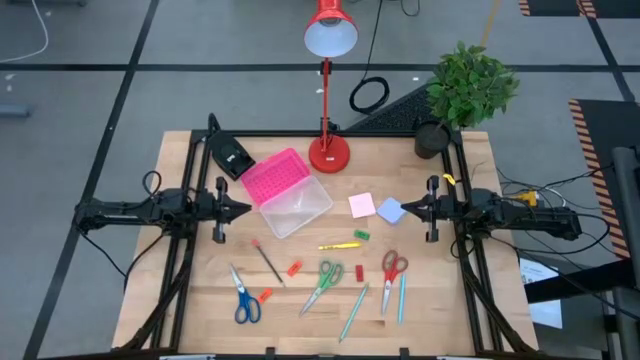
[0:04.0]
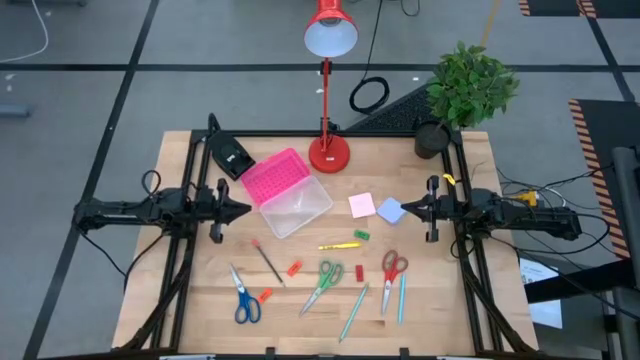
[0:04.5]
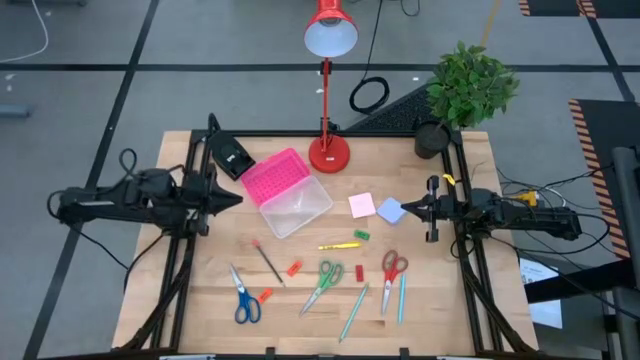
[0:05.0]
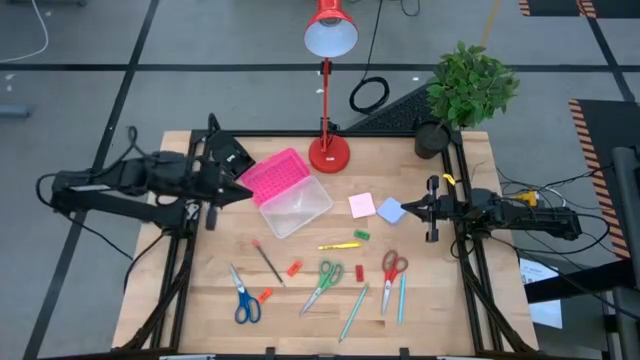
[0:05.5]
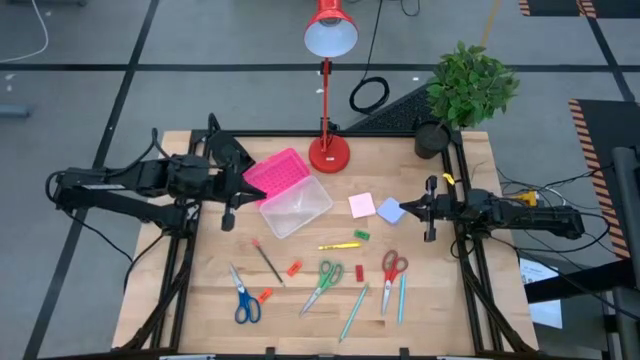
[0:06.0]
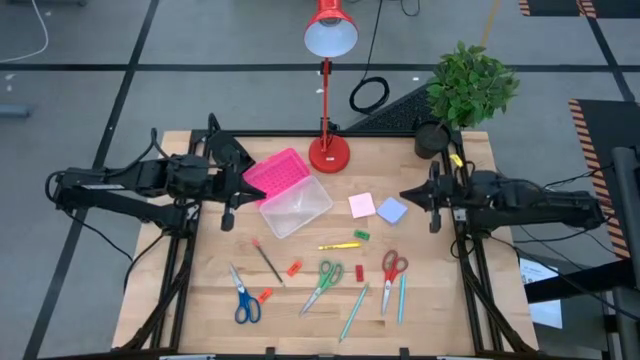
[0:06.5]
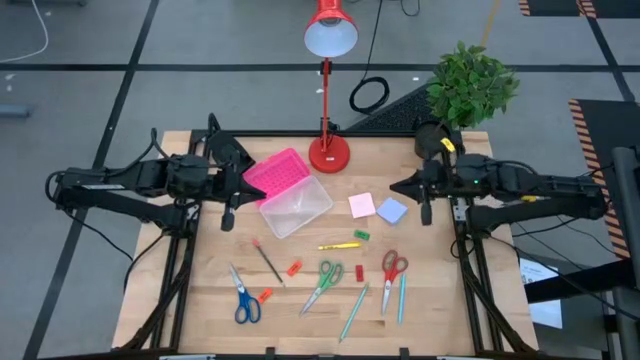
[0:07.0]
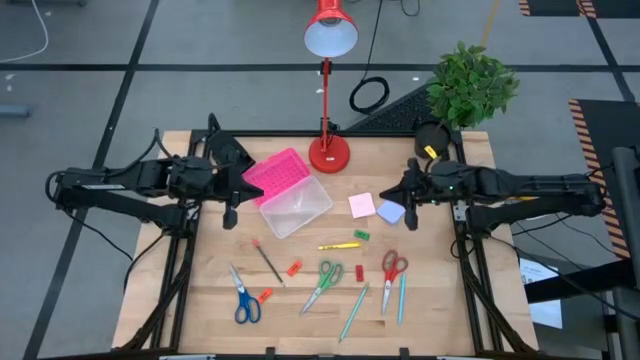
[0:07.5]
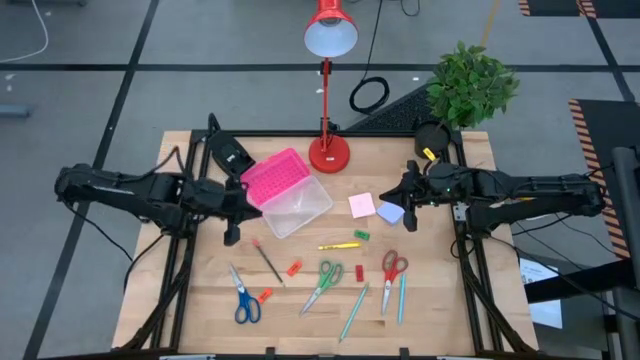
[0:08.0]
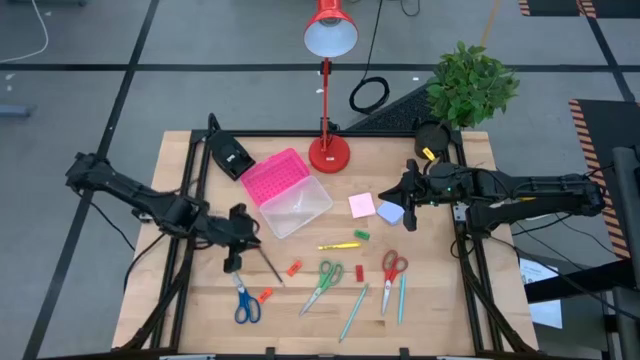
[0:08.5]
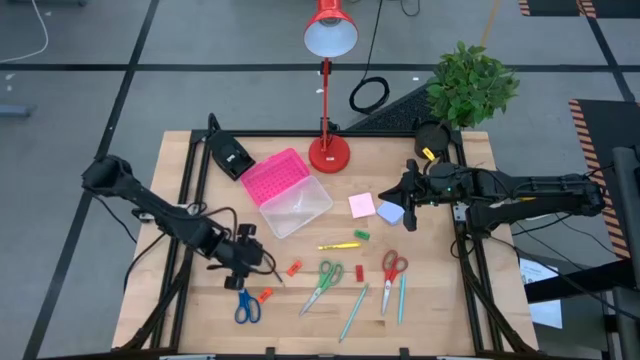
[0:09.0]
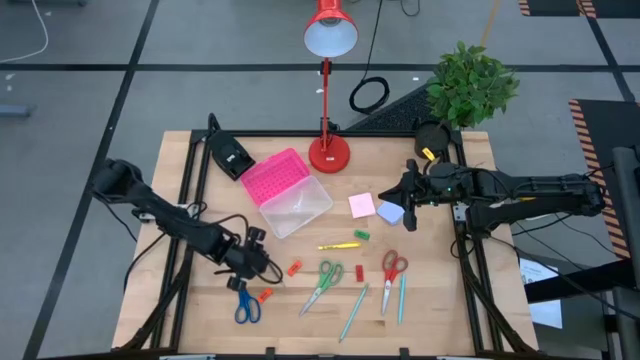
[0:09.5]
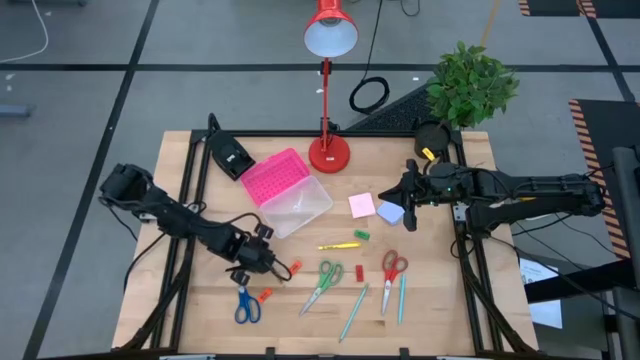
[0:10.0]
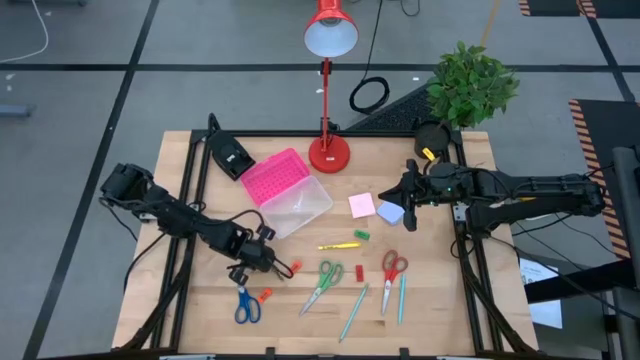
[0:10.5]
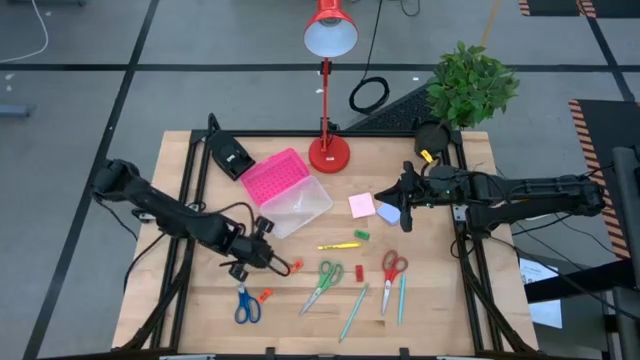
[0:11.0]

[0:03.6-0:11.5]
Task: Pack school essentials
Put the dark blue pencil into the pink supply box

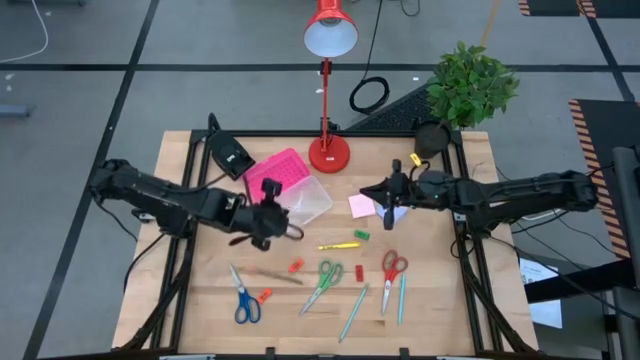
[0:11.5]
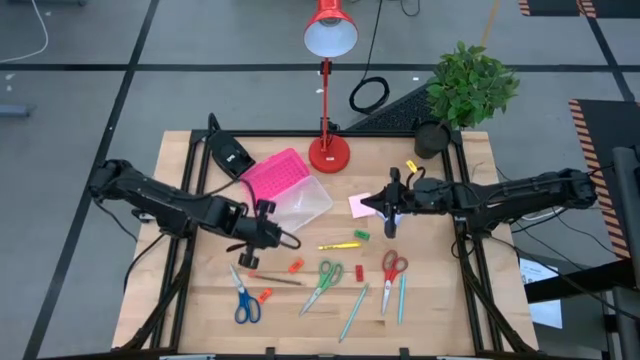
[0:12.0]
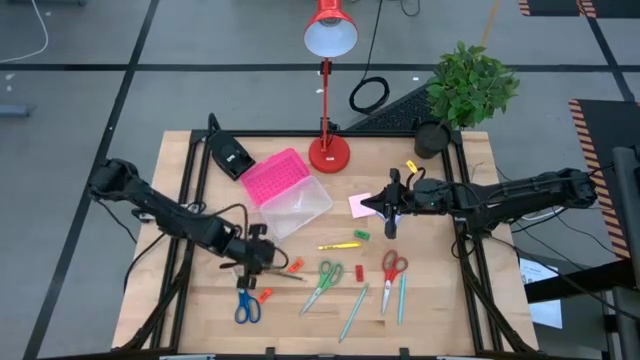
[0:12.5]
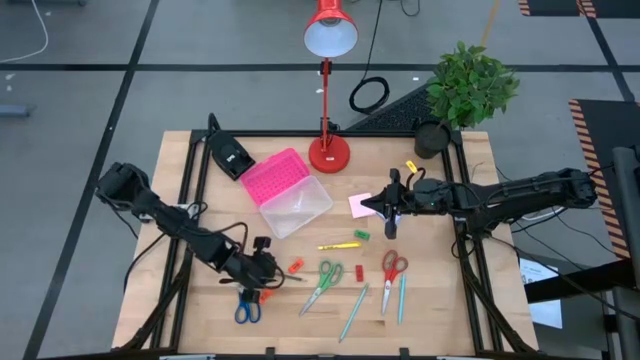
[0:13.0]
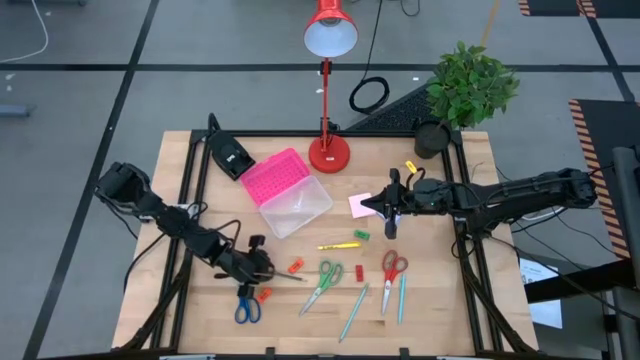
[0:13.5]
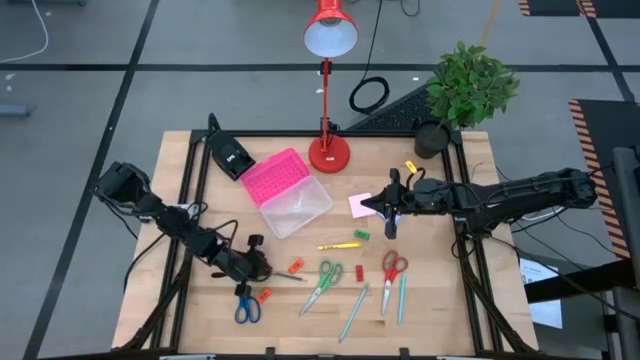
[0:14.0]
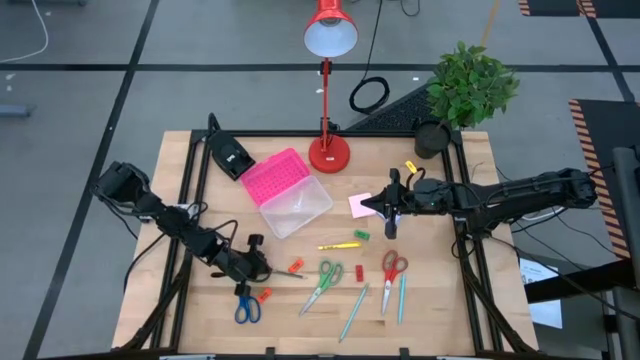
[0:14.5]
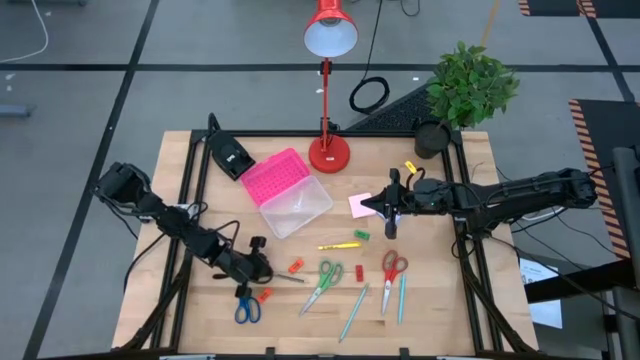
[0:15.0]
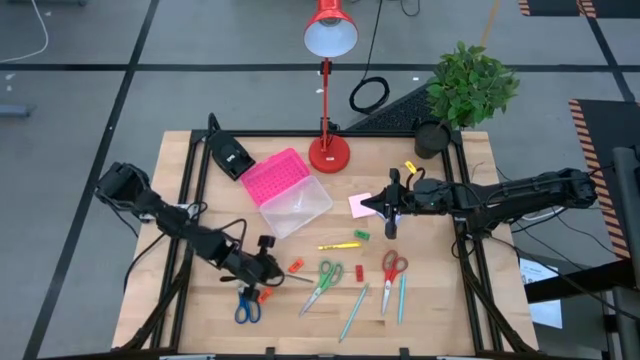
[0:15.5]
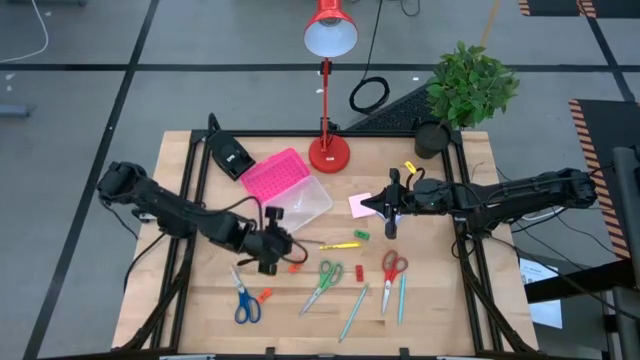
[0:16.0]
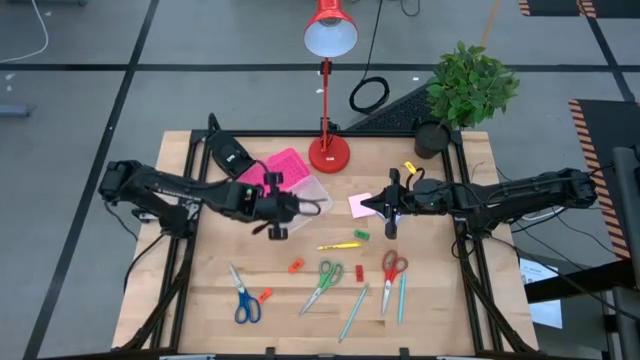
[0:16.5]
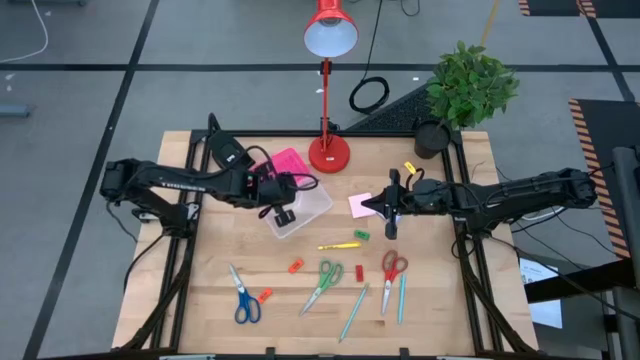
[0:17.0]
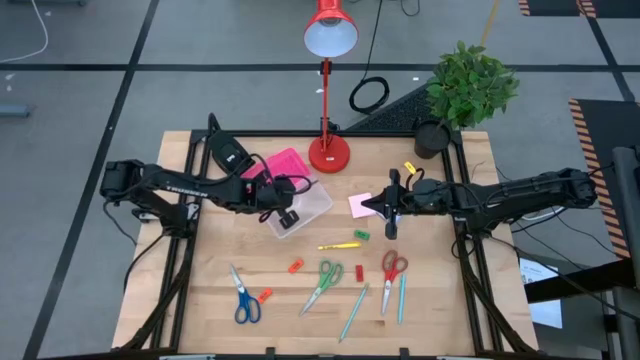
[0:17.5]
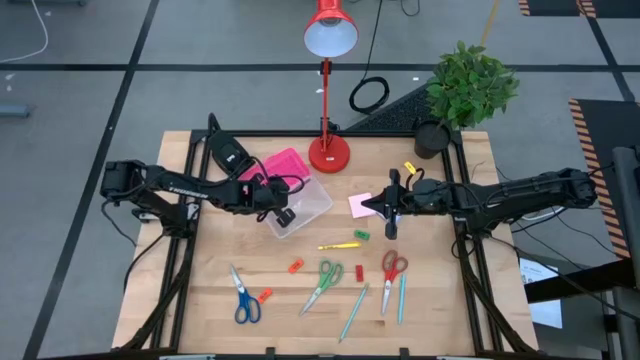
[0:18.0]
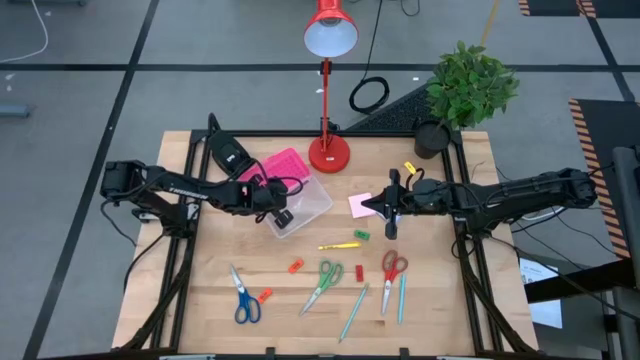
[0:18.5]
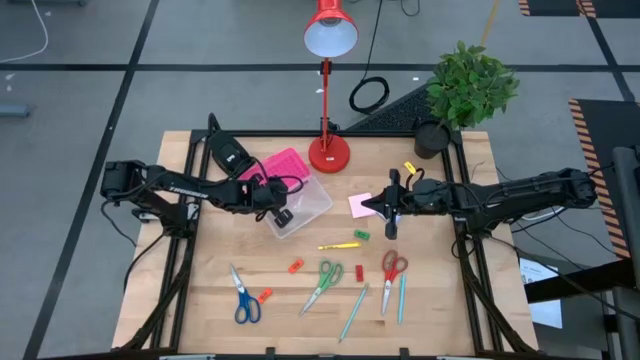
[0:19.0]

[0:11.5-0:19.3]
Put the dark blue pencil into the pink supply box

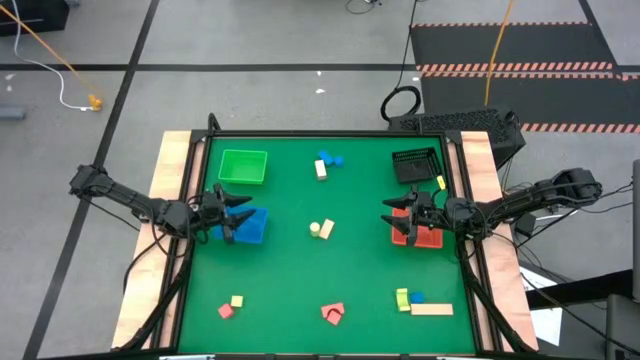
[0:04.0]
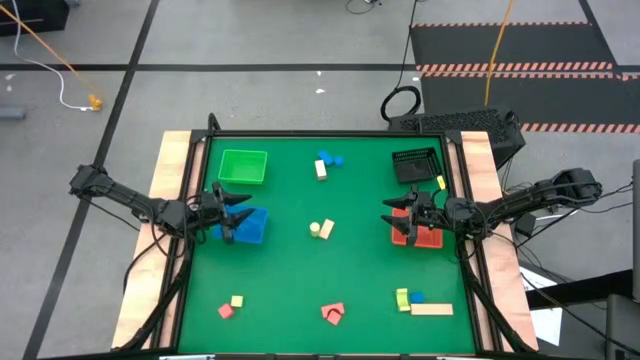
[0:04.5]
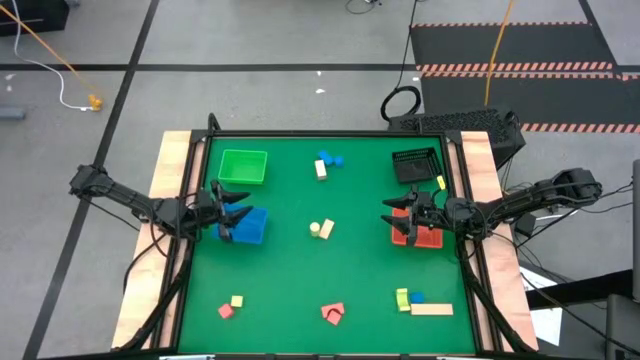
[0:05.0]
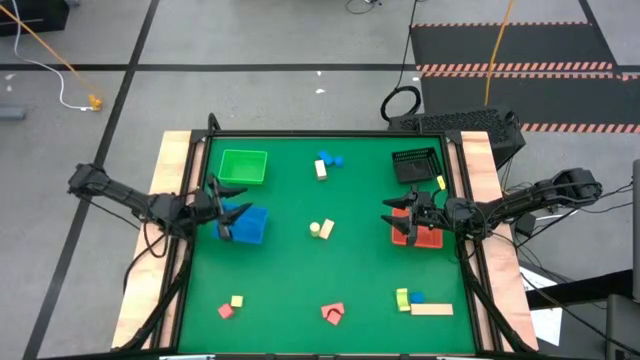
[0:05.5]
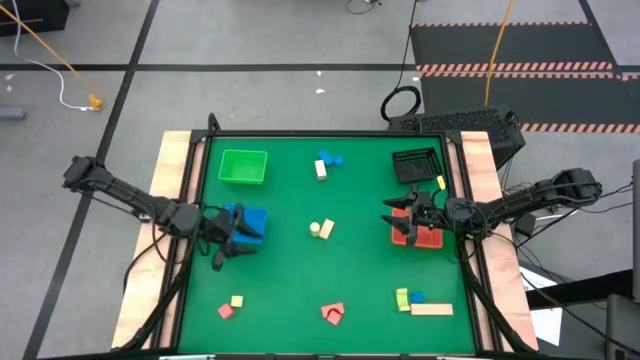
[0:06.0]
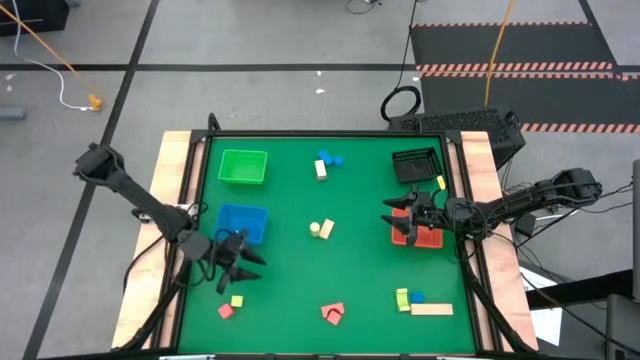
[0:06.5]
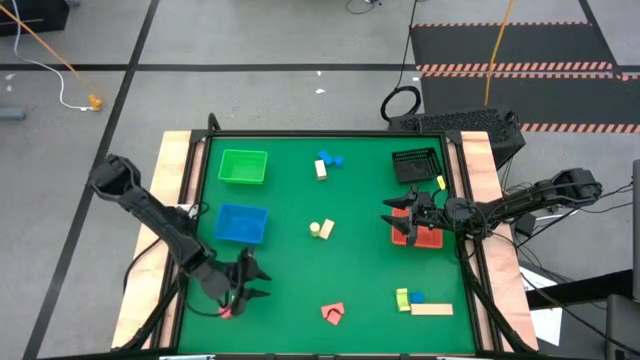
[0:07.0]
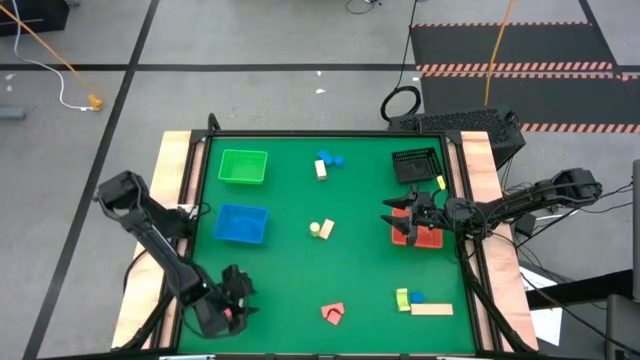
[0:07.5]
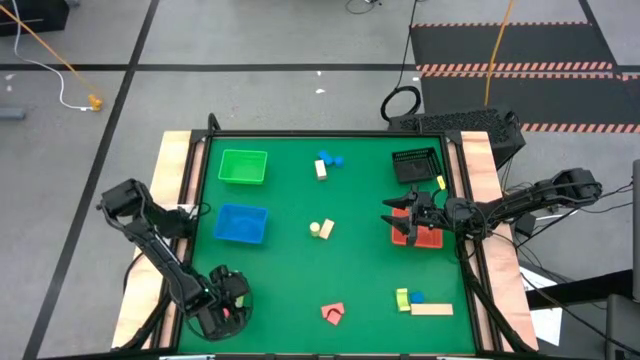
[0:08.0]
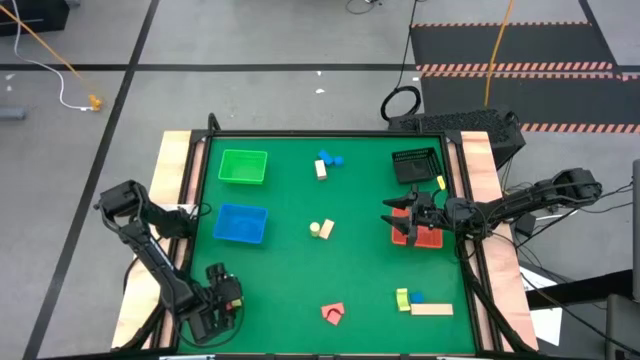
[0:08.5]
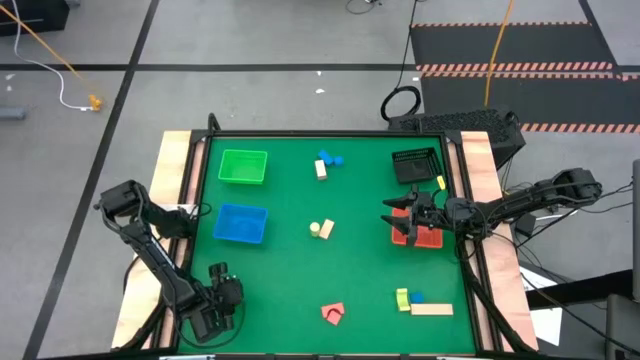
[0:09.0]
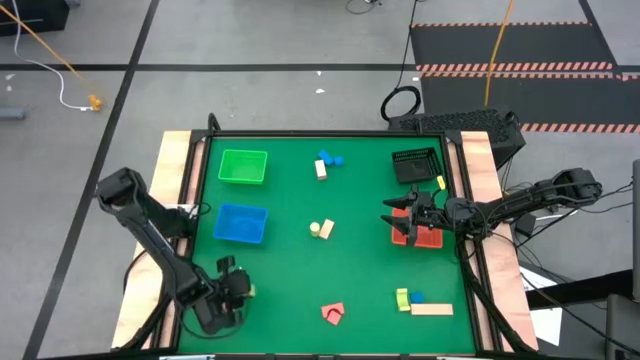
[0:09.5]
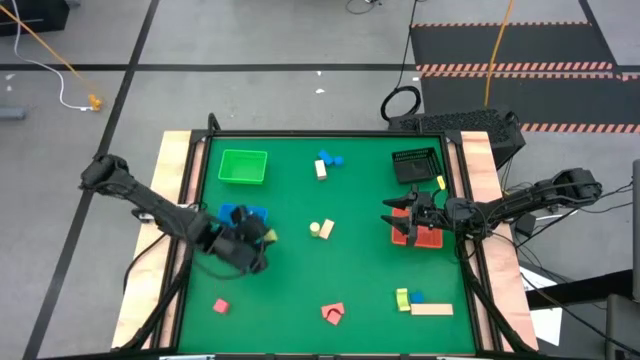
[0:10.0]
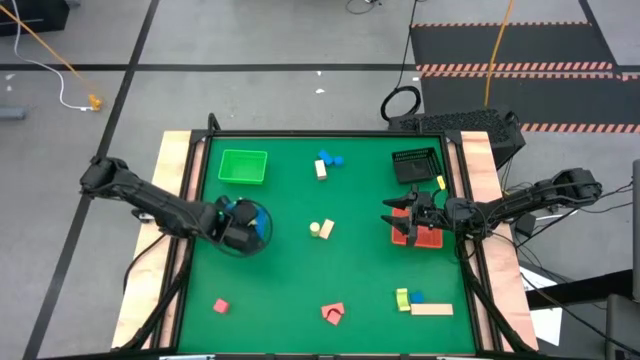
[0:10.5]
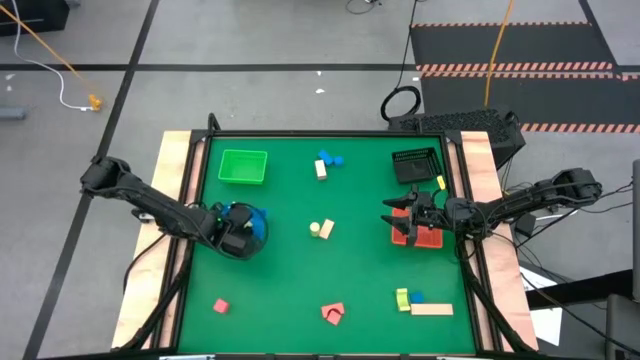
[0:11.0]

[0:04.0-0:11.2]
Task: Sort & place blocks by color
Put the bottom left green block into the blue bin
